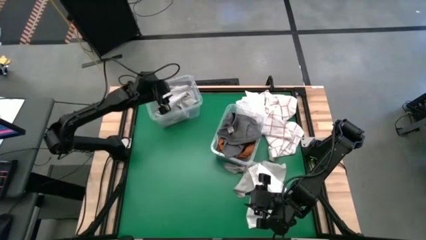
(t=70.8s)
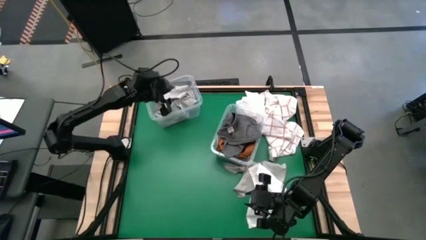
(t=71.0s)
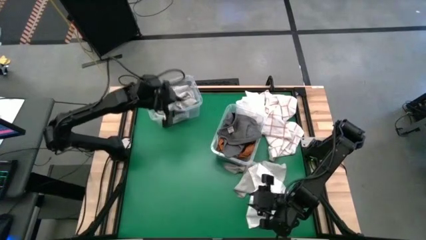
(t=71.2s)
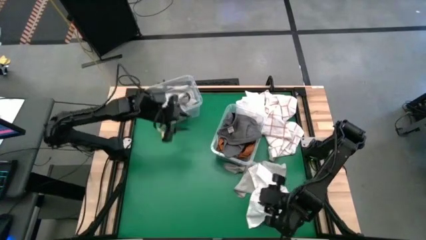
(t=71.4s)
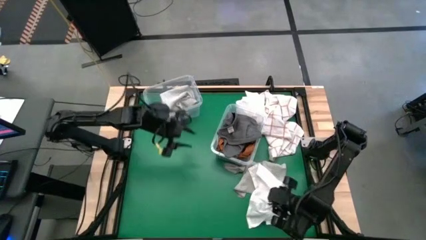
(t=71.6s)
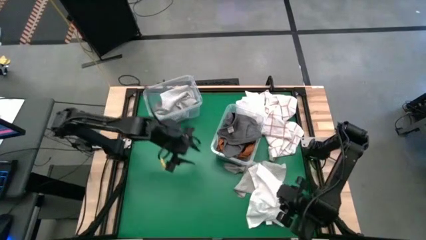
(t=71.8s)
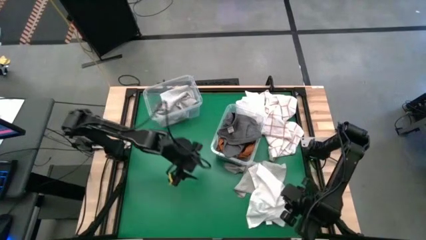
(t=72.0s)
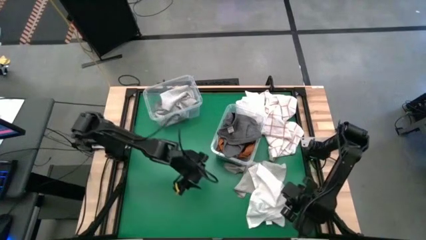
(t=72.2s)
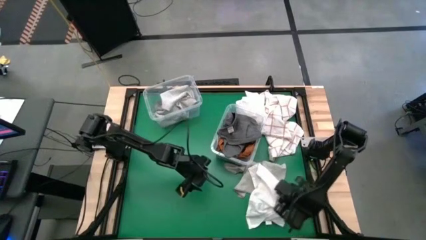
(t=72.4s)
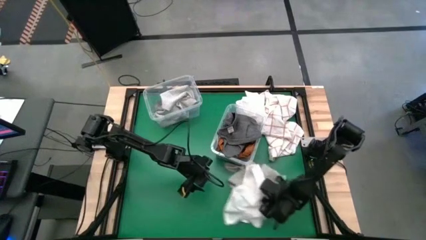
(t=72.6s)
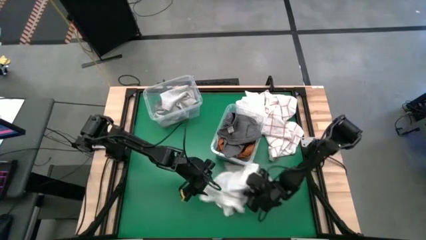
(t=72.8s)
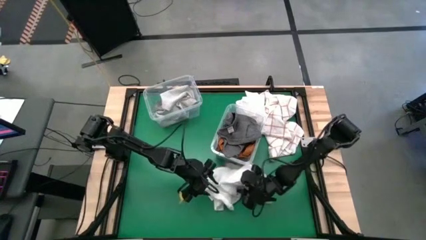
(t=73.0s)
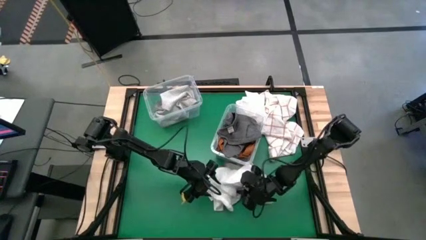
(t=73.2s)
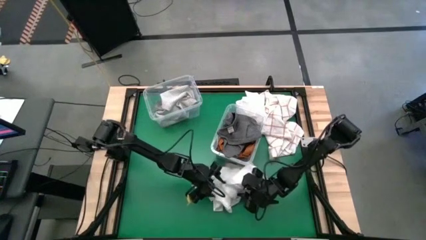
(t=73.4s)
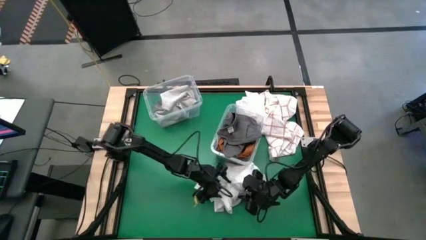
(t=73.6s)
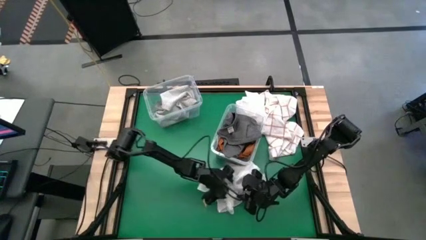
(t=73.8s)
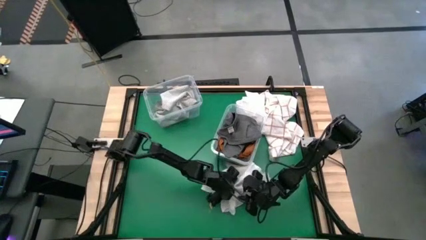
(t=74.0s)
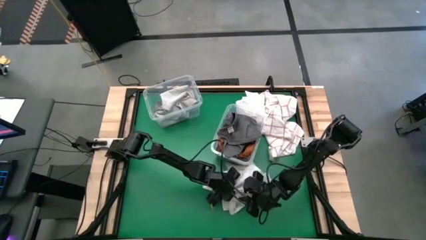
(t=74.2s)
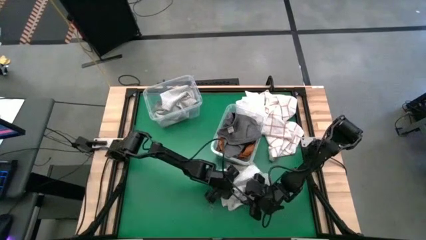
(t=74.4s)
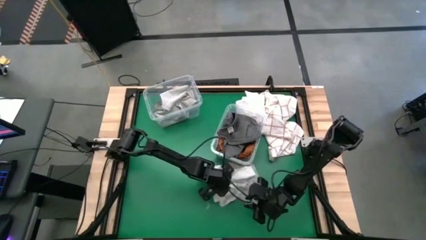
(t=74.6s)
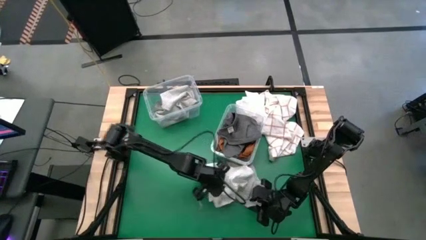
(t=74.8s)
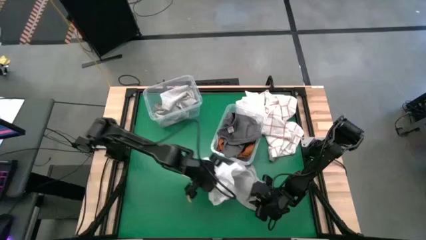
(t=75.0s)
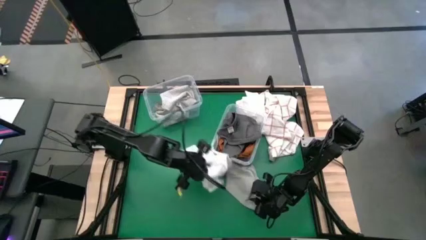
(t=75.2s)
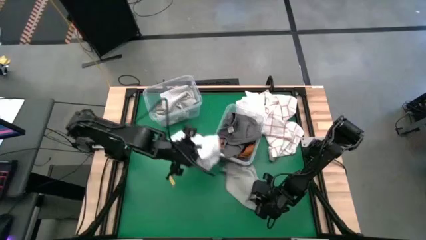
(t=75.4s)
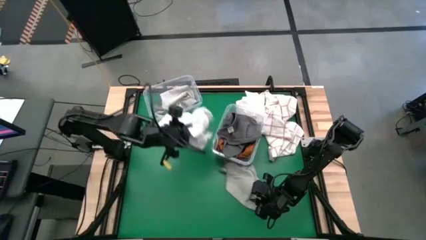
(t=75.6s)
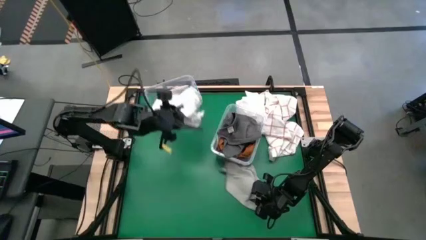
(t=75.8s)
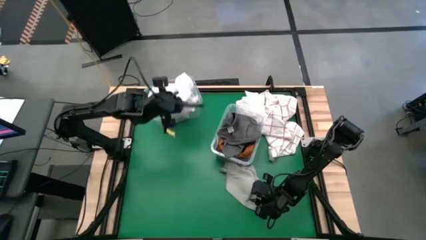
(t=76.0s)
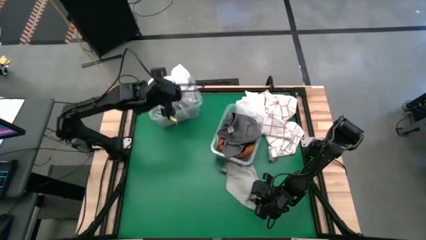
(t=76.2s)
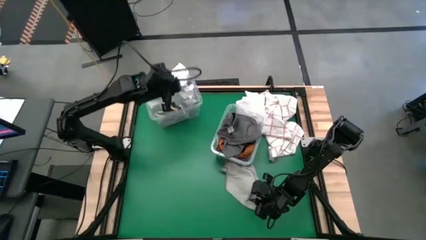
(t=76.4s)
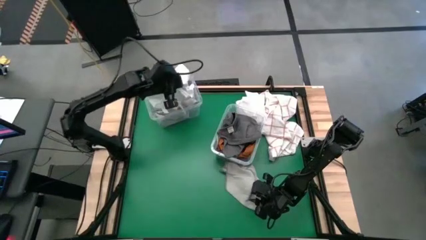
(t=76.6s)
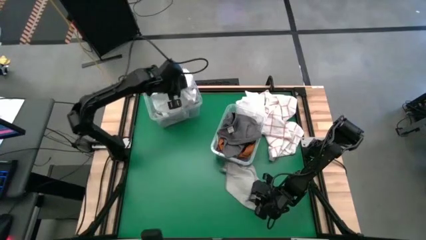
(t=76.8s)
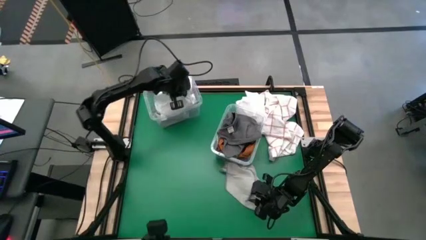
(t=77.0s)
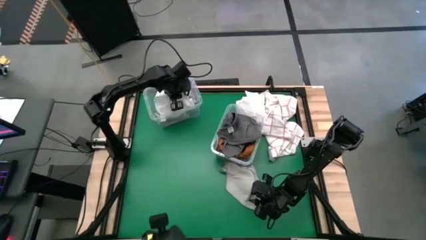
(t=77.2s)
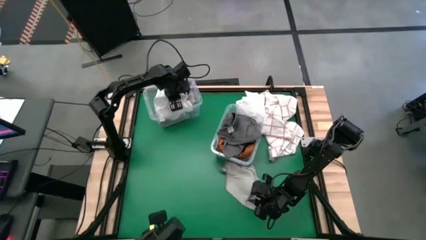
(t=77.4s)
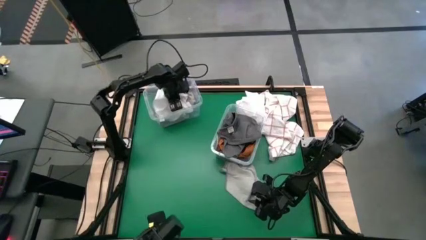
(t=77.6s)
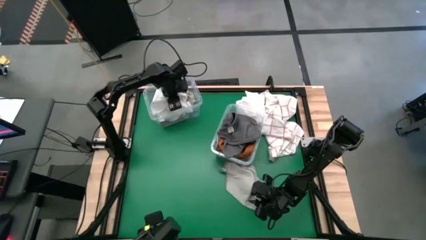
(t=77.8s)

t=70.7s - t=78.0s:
Task: Sort towels by color in basket
Put the bottom white towel into the left transparent bin

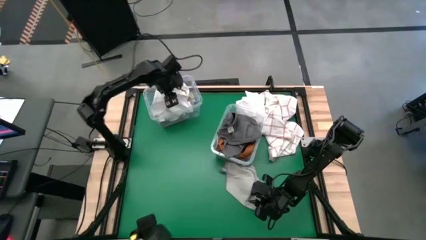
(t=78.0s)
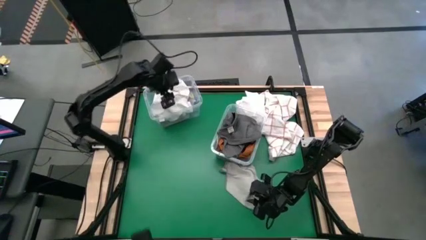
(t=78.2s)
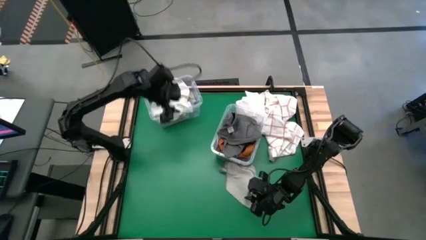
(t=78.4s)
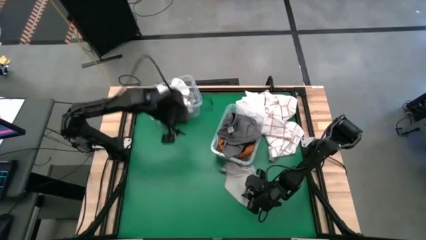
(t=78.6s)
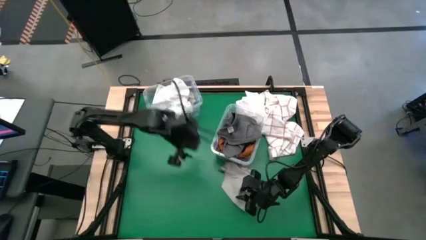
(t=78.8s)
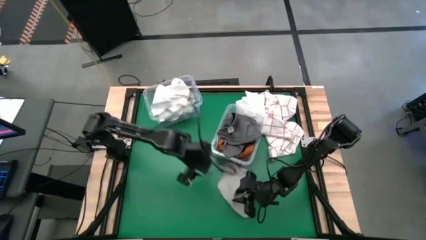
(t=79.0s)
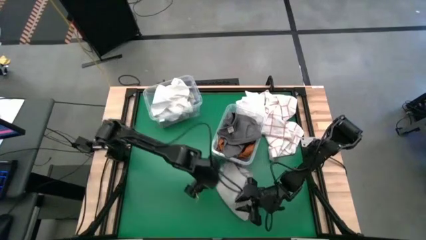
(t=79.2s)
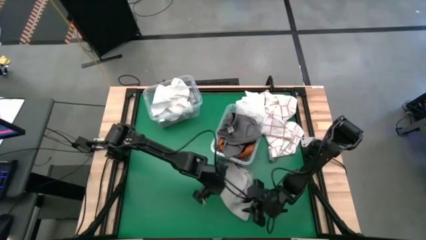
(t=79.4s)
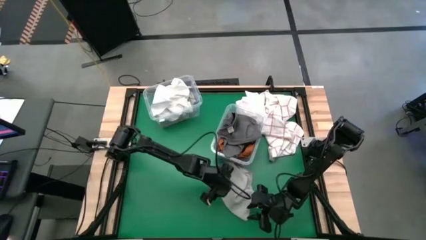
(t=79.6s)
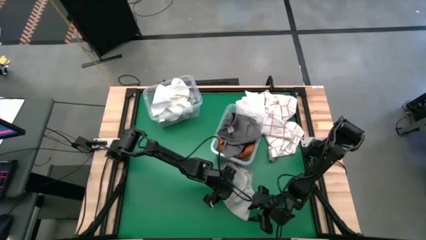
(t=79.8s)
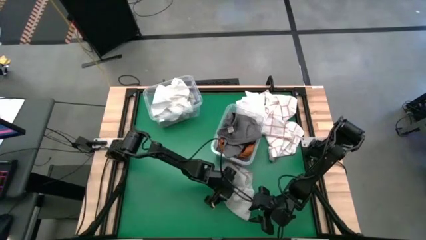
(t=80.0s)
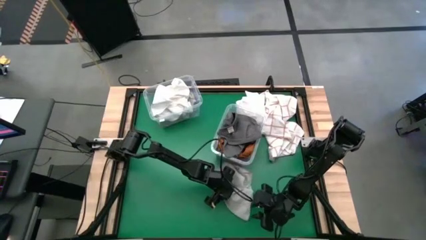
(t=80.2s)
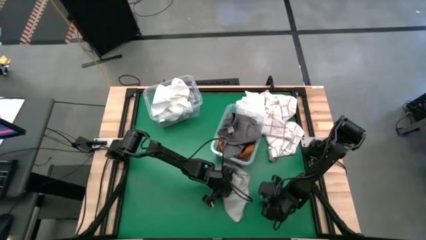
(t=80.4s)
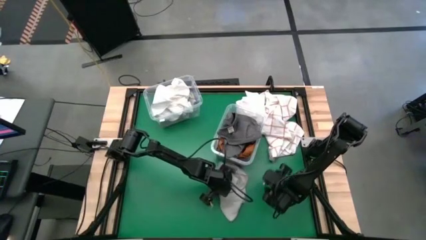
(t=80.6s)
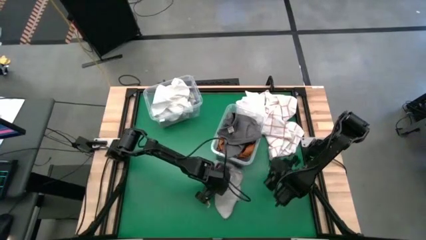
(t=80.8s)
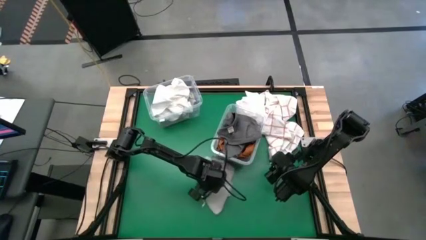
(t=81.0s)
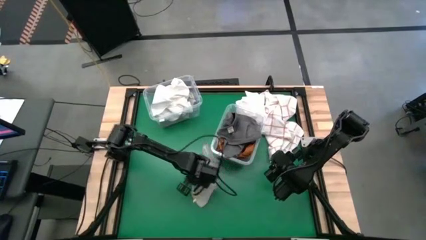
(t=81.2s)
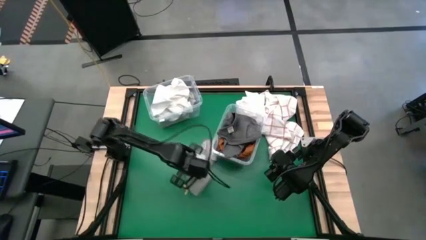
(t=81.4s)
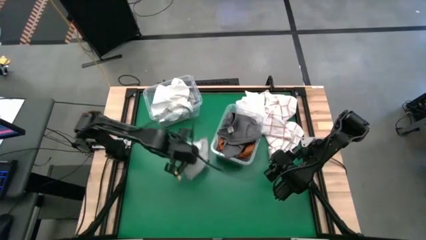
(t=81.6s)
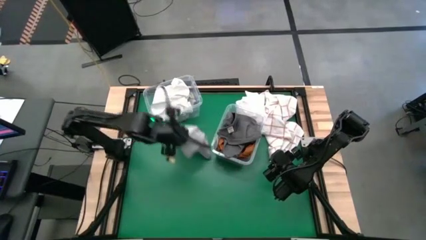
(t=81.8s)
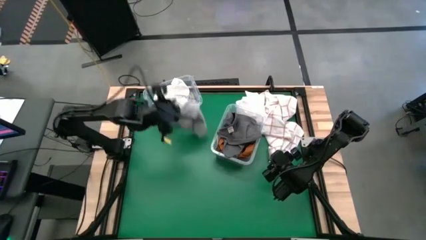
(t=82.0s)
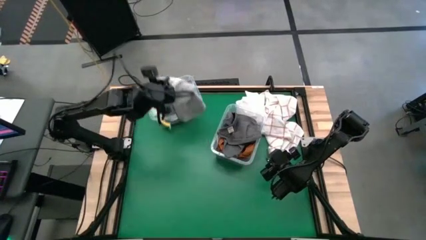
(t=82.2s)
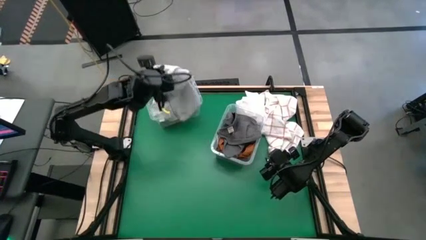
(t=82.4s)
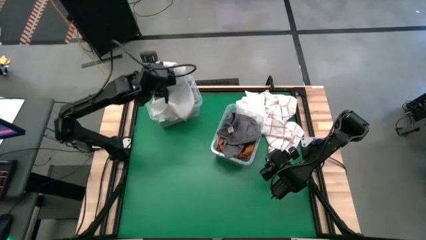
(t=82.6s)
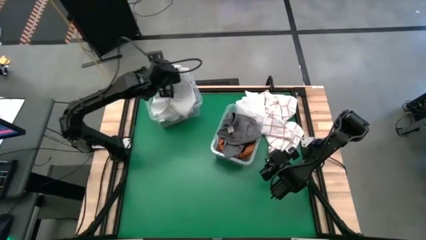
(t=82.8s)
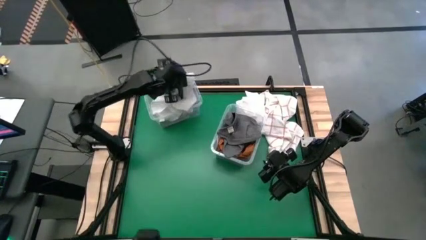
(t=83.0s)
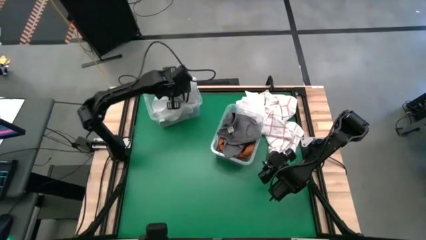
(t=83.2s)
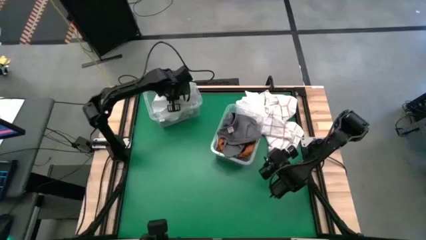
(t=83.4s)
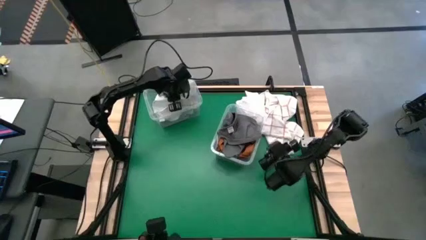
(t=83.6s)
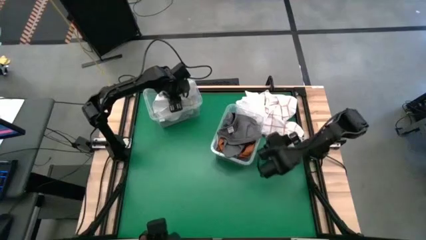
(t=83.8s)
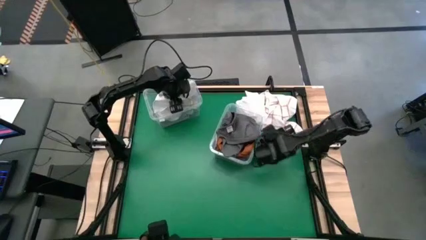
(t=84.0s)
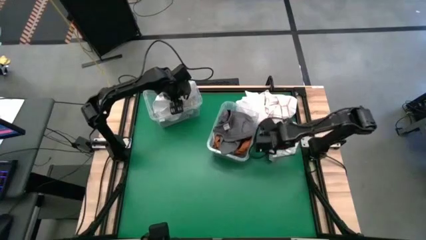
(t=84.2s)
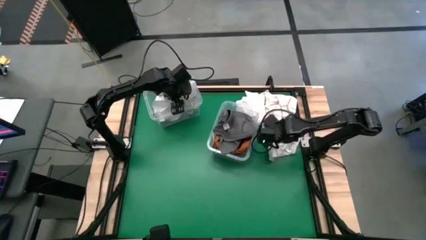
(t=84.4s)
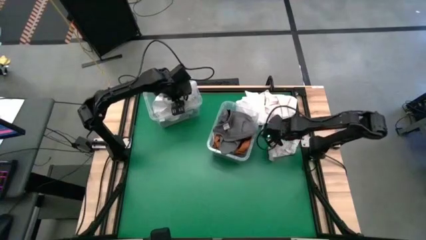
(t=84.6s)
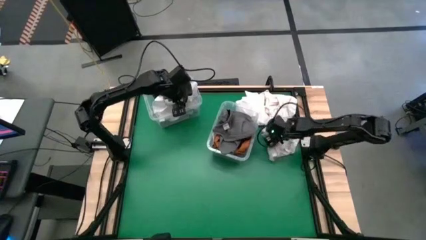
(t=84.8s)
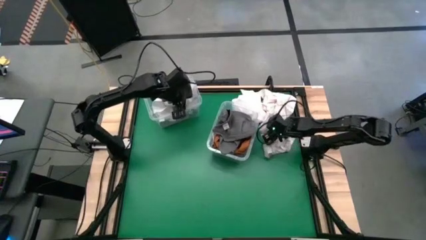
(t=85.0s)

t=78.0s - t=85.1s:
Put the gray towel into the left transparent bin

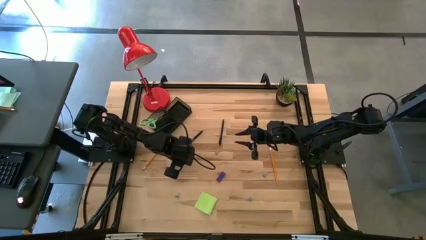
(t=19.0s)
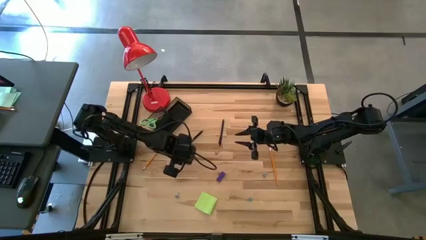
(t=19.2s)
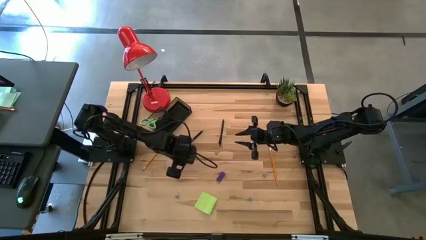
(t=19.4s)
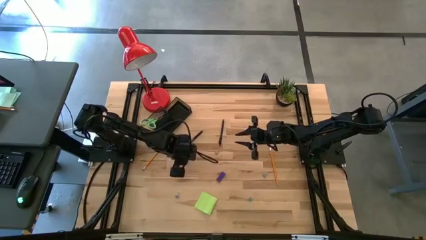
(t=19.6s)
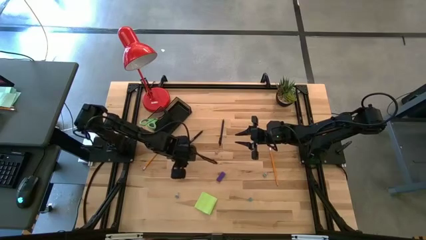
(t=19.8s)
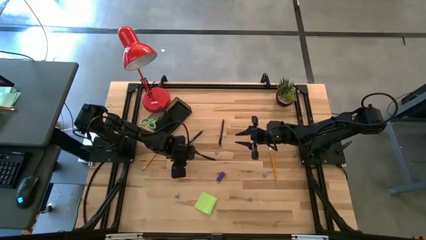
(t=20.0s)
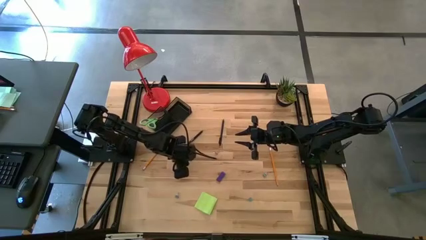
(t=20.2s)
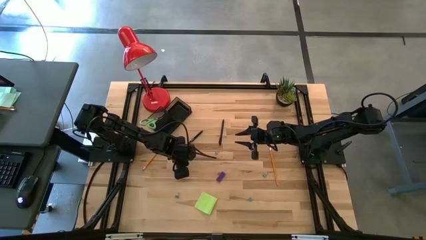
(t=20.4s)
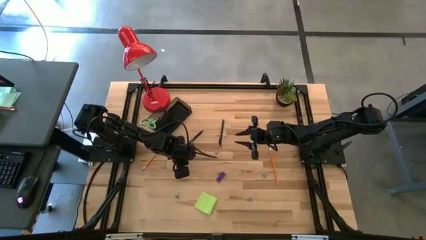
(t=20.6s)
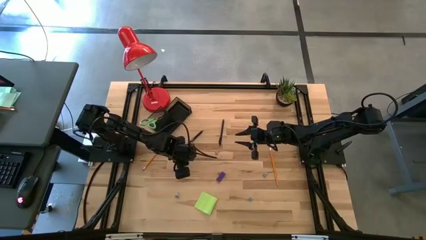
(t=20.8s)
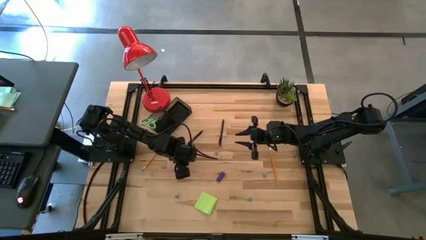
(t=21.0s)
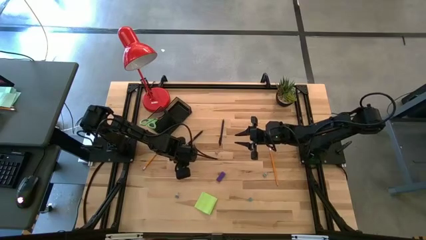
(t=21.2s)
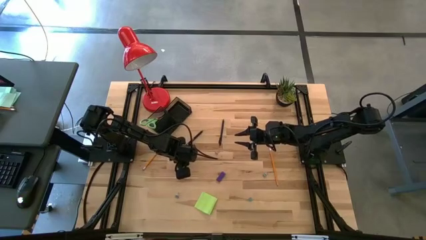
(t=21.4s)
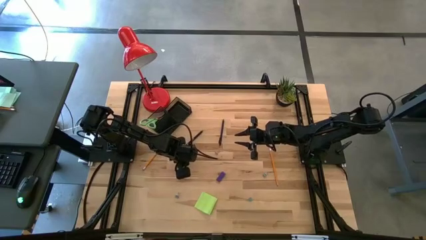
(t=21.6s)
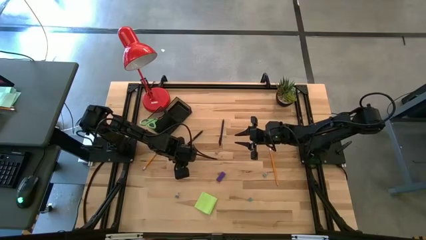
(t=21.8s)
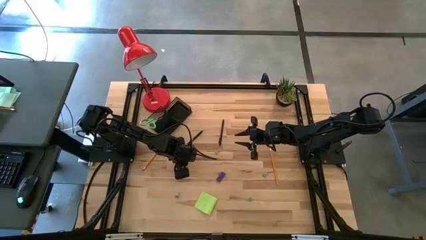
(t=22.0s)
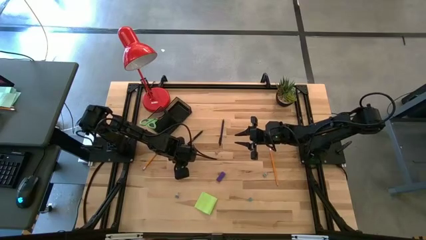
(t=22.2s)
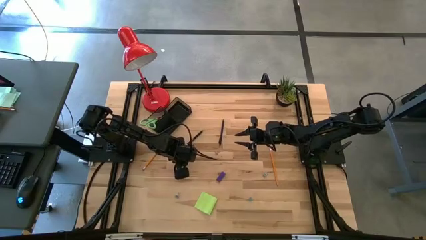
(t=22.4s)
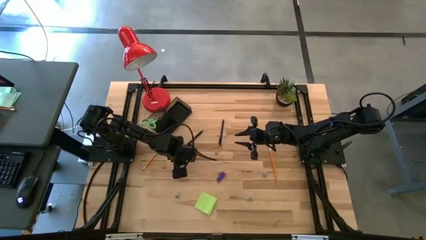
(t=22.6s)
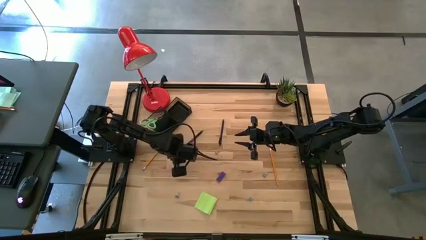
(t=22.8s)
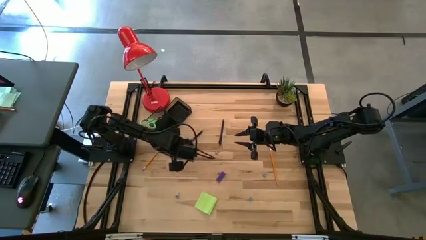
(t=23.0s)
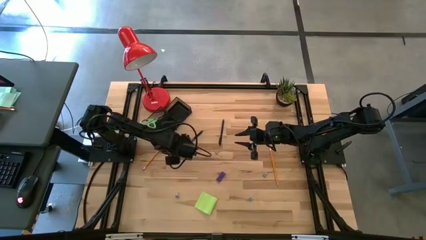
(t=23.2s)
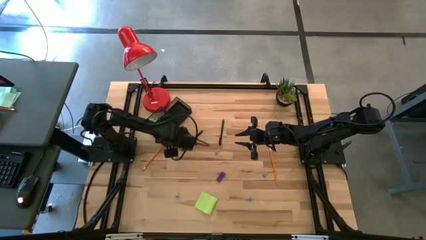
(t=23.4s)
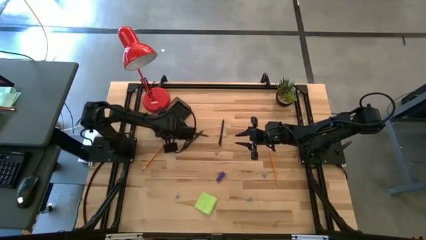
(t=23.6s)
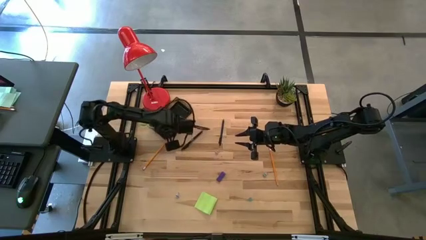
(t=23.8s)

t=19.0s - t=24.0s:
Task: Pick and place office supplies into organizer
Put the white binder clip into the desk organizer
